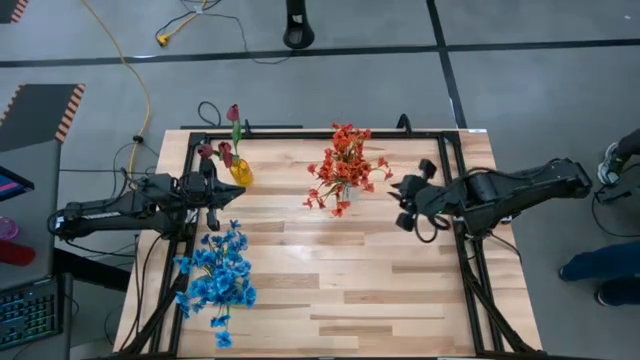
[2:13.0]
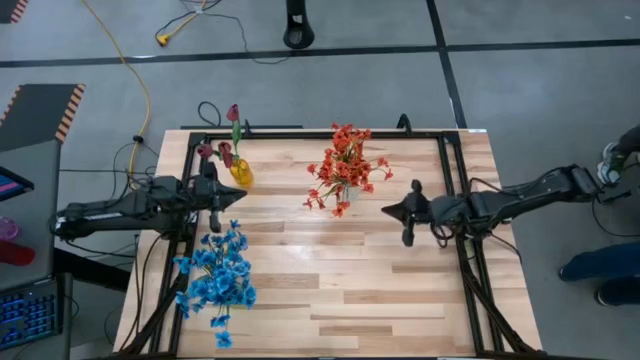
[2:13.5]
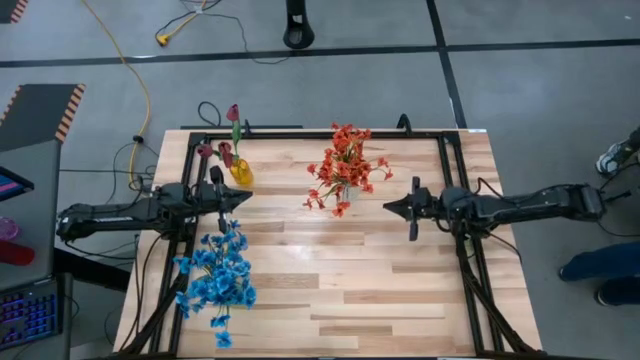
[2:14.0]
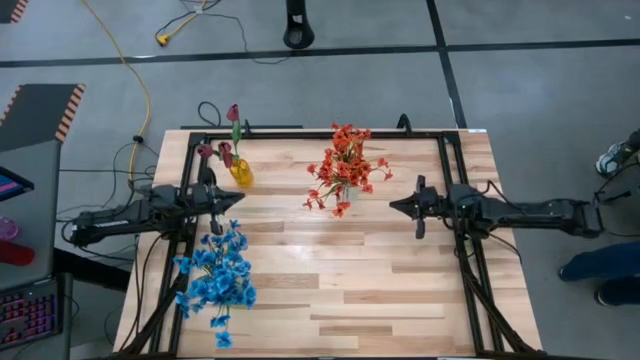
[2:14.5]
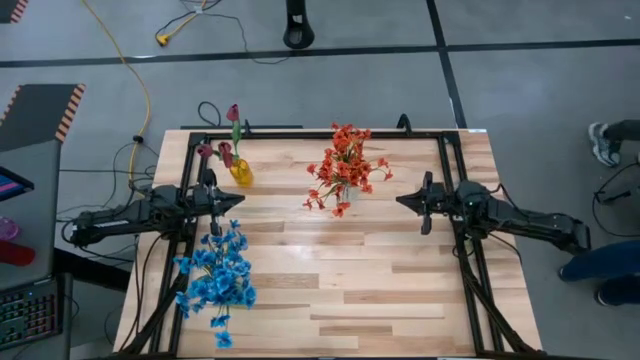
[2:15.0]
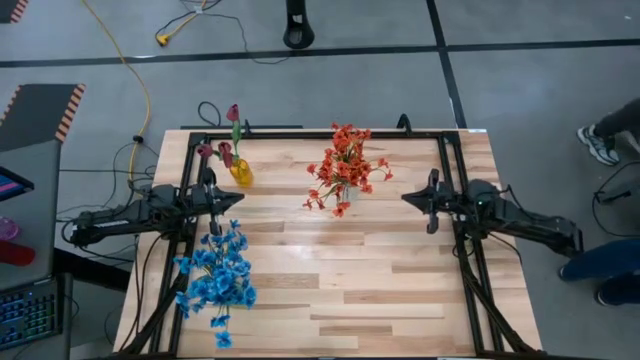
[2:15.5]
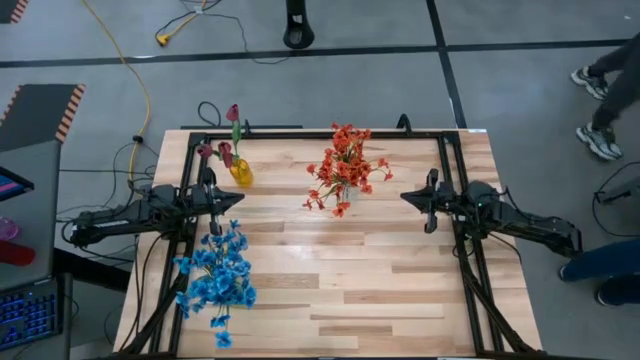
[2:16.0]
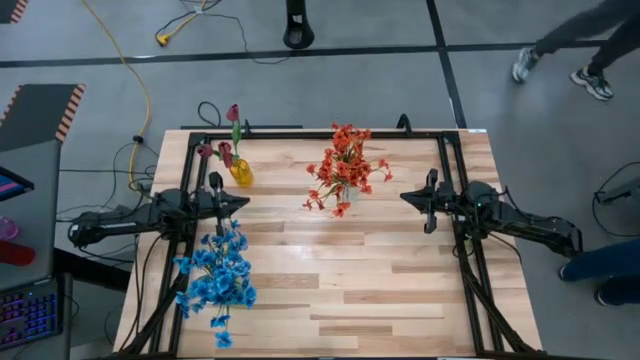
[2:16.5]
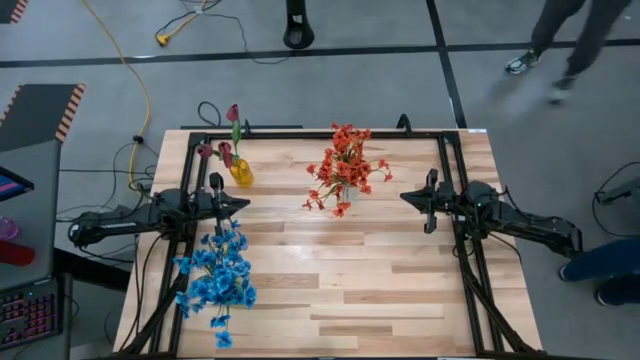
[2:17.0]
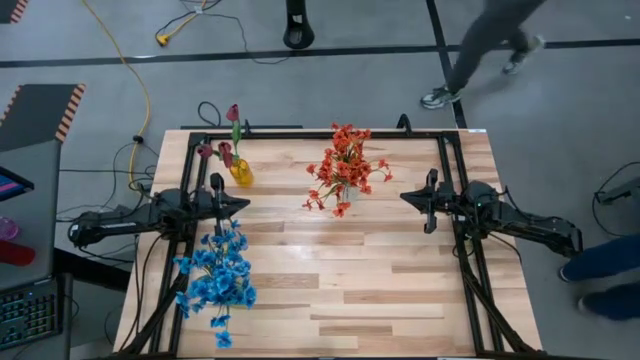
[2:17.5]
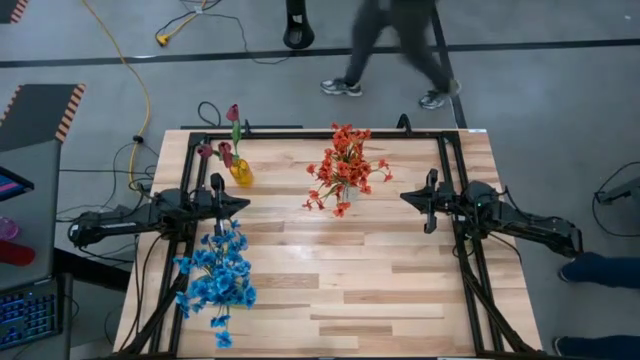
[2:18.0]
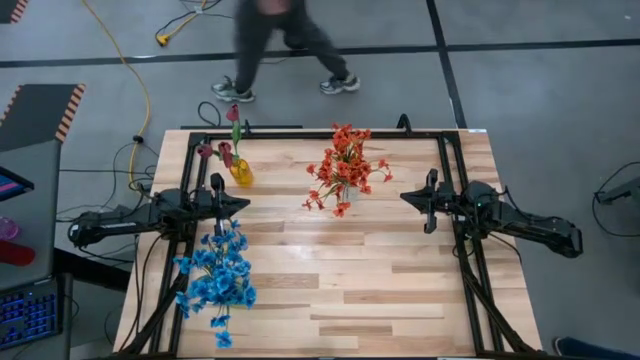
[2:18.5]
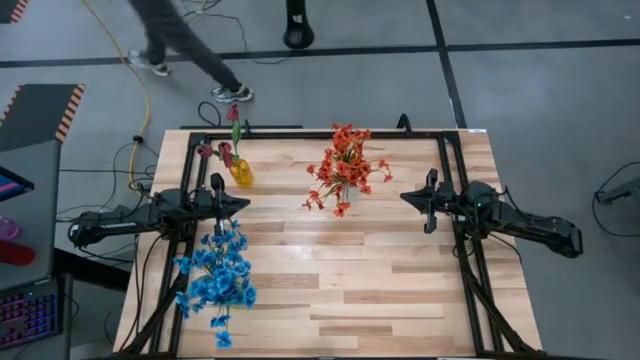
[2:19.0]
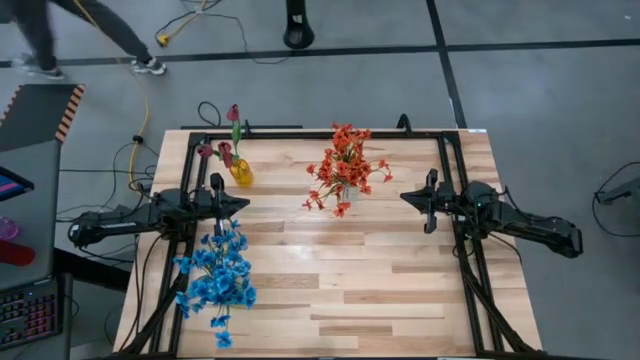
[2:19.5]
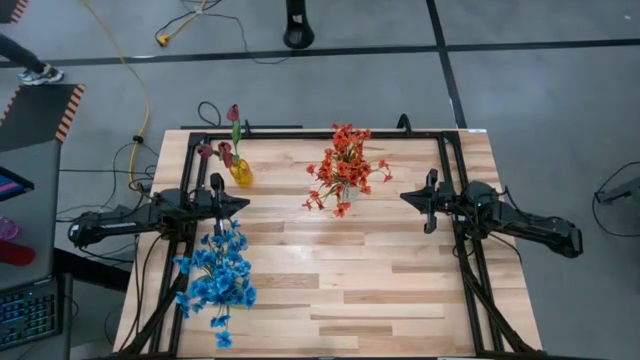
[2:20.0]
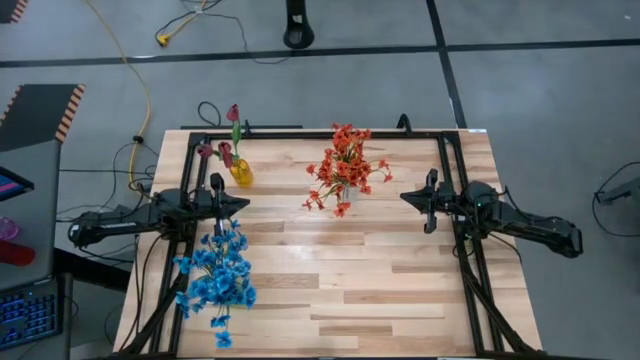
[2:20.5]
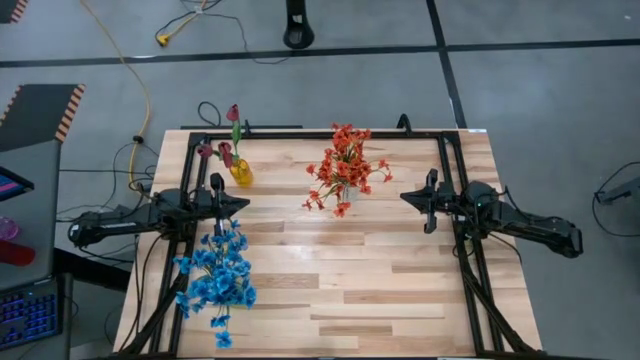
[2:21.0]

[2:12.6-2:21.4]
Task: Sort flowers into vase by color
Return to Home Position

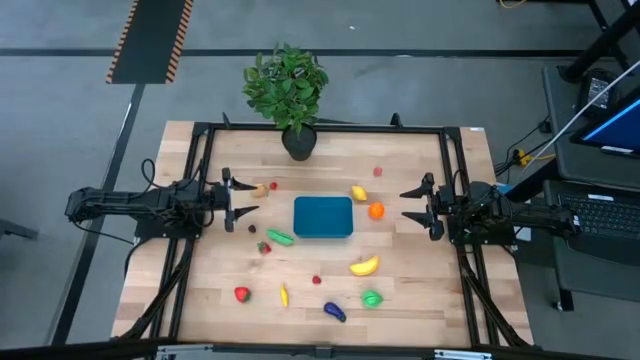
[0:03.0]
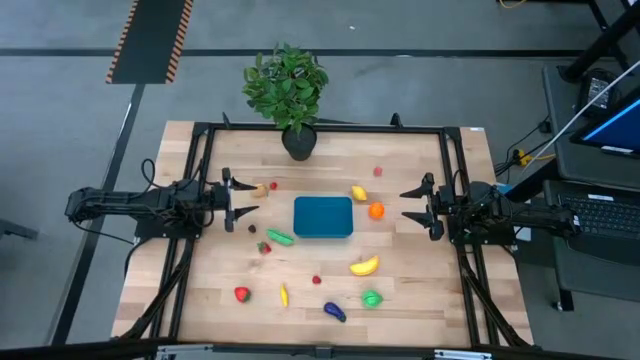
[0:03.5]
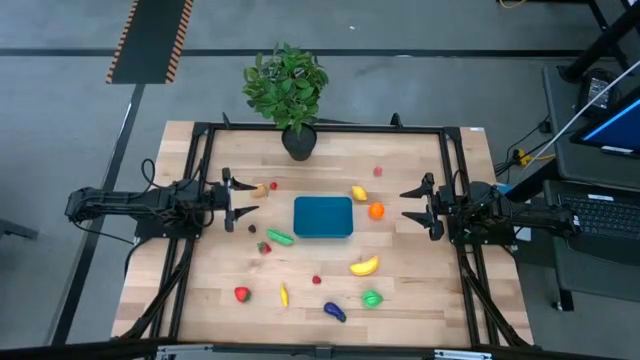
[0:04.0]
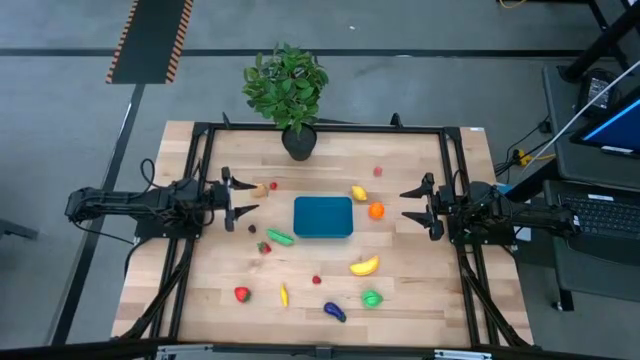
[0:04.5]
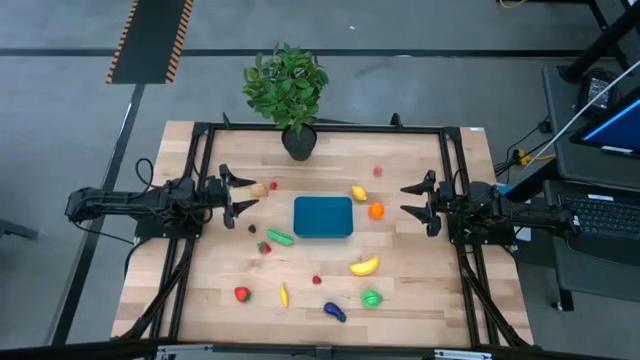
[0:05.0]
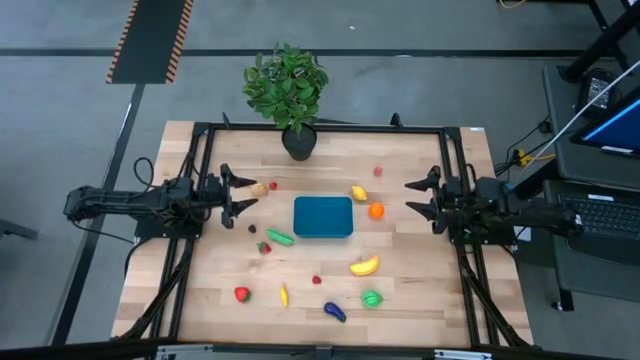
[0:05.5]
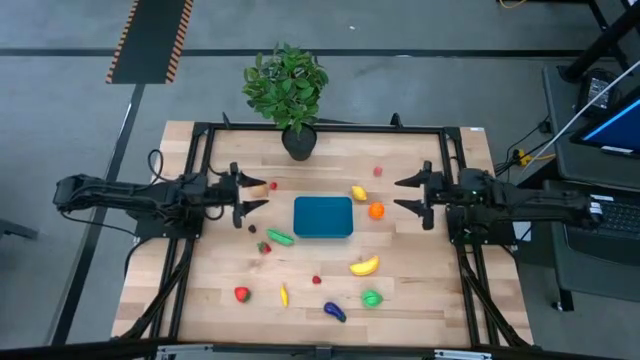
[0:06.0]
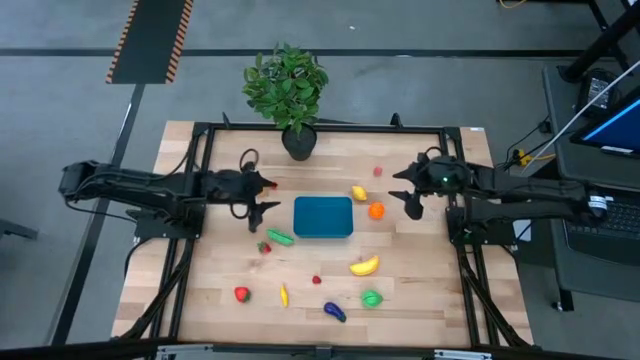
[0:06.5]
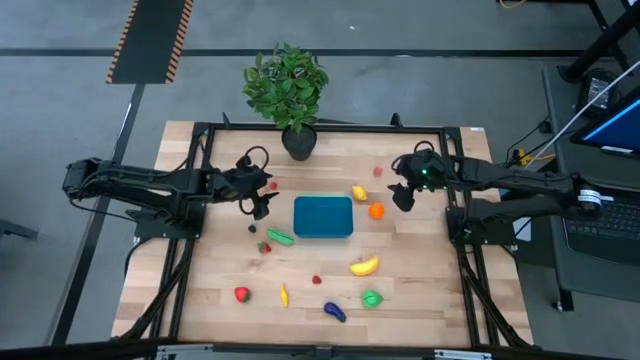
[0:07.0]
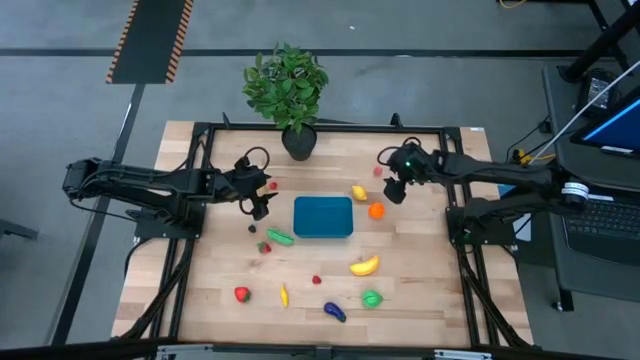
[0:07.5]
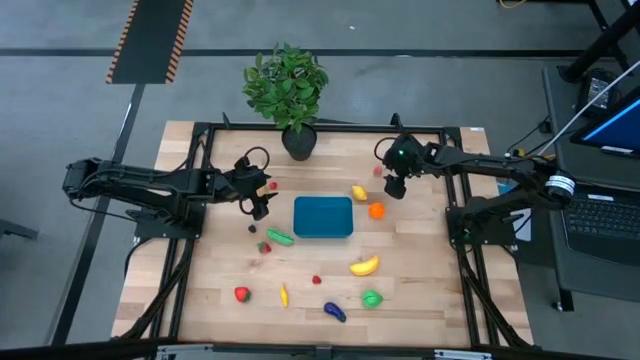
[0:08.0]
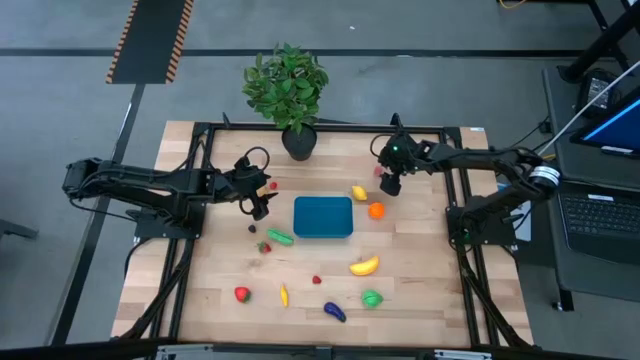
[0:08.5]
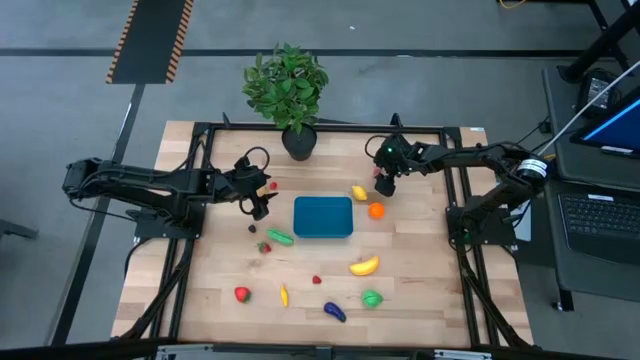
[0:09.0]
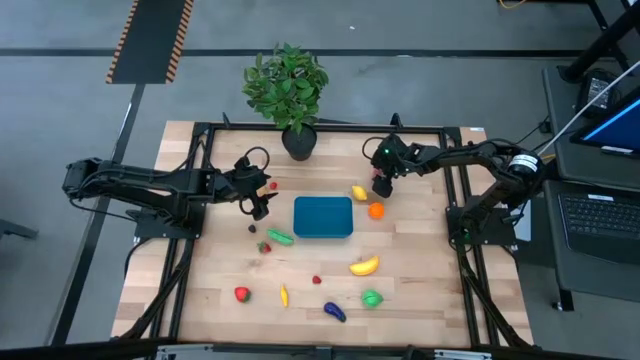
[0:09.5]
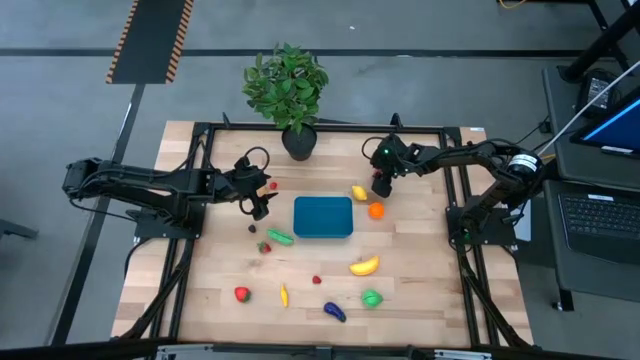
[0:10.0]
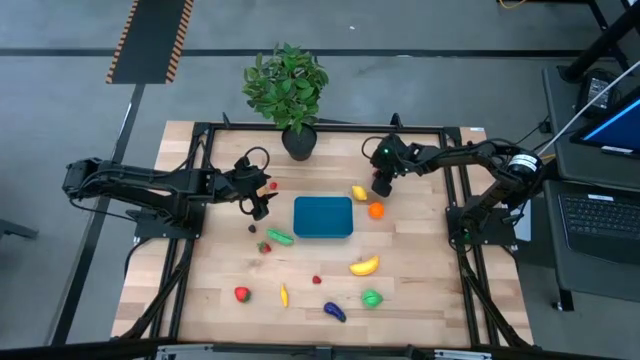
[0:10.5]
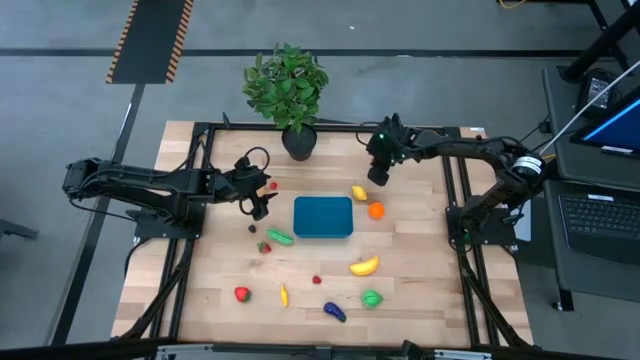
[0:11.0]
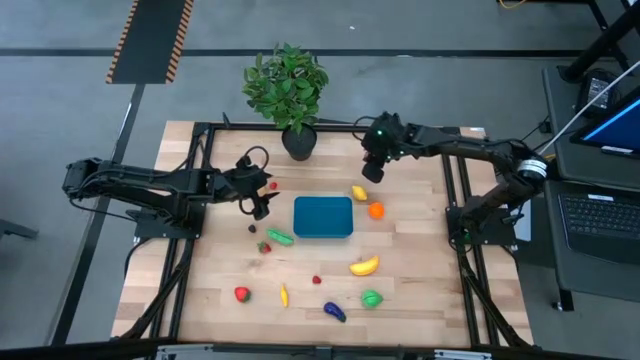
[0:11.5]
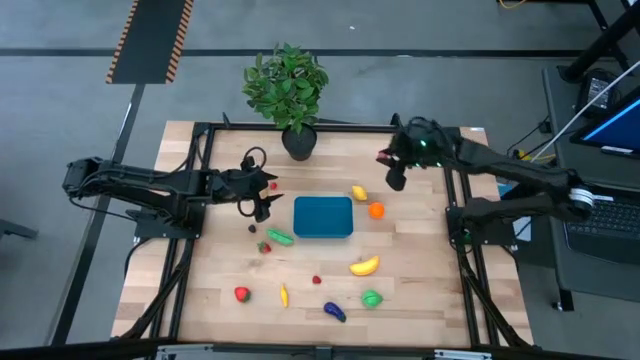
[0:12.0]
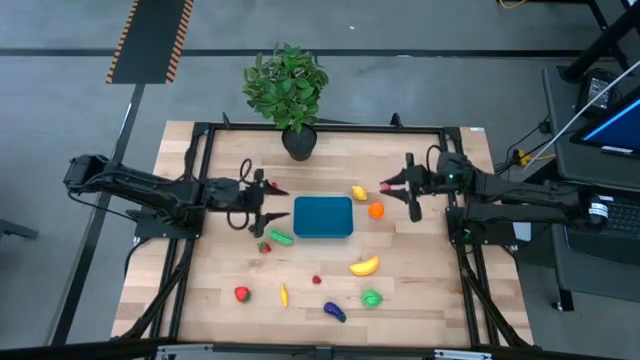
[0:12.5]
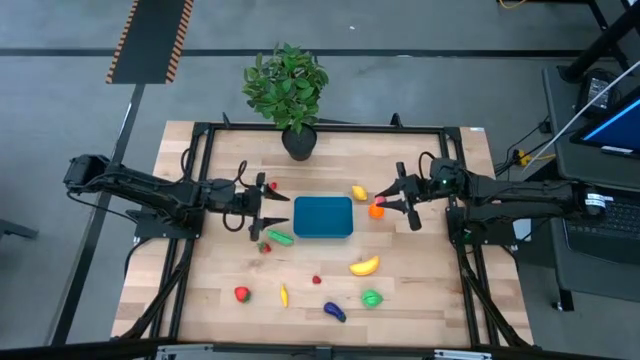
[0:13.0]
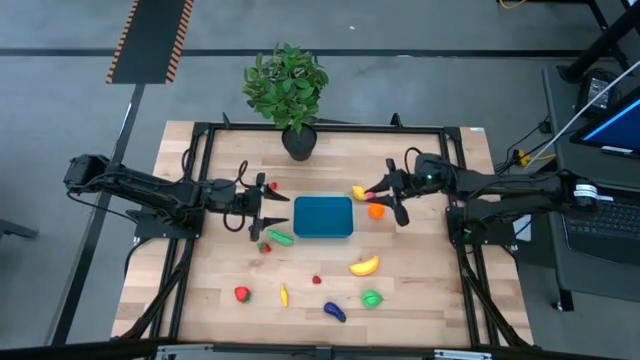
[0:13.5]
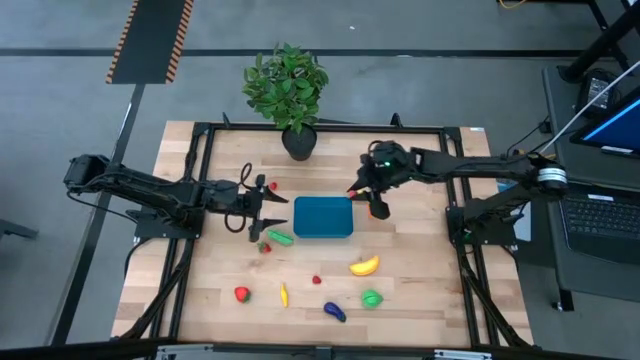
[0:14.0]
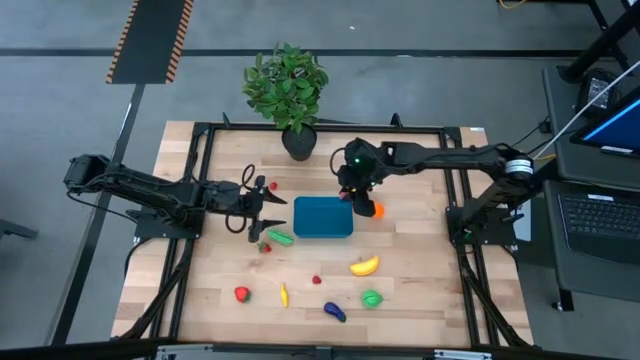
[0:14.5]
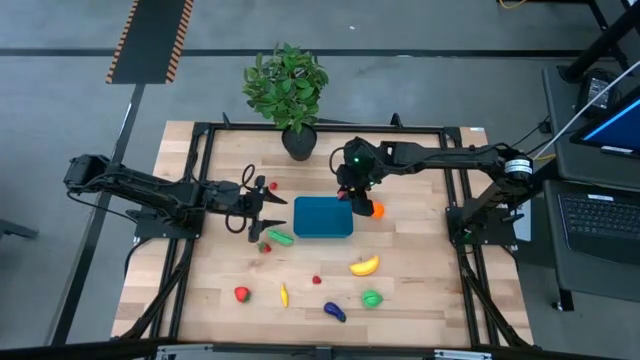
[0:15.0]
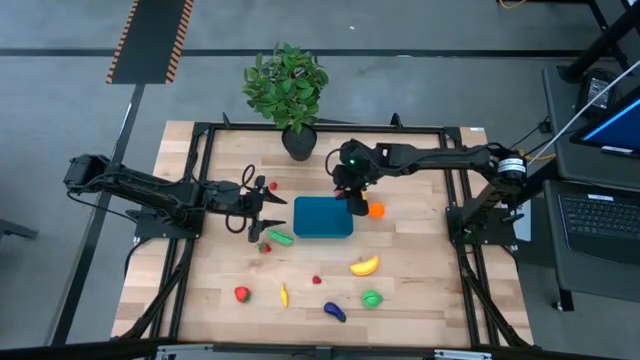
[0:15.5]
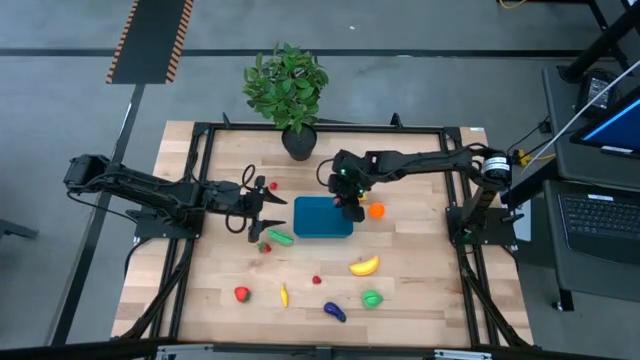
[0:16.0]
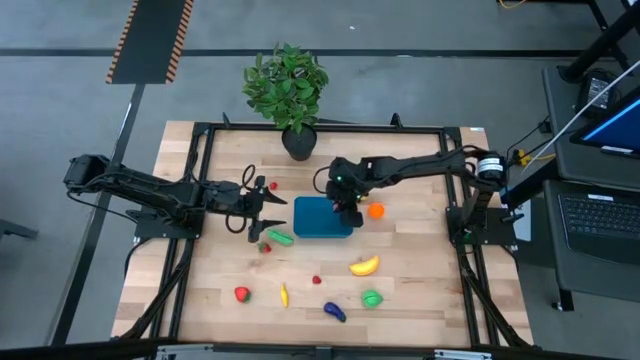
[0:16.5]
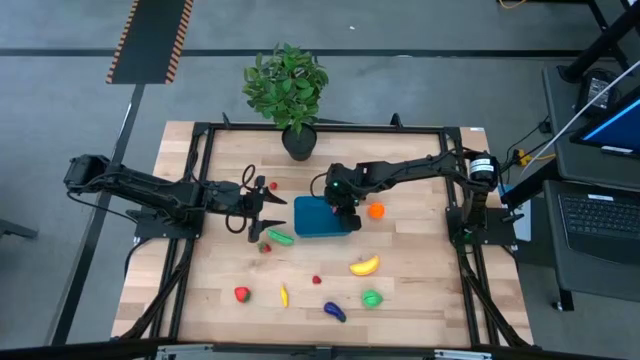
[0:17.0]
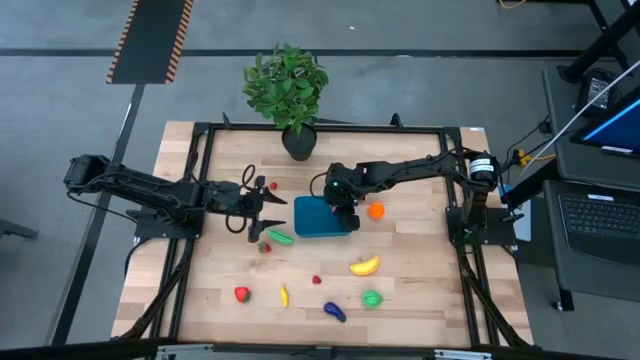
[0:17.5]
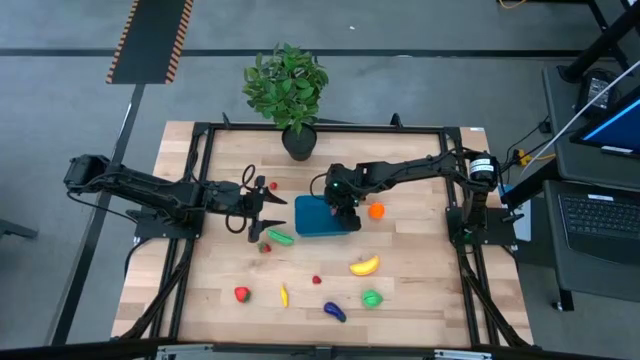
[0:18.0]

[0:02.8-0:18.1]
Task: Pick and placing Produce into tupperware
Put the pink apricot into the blue bin
